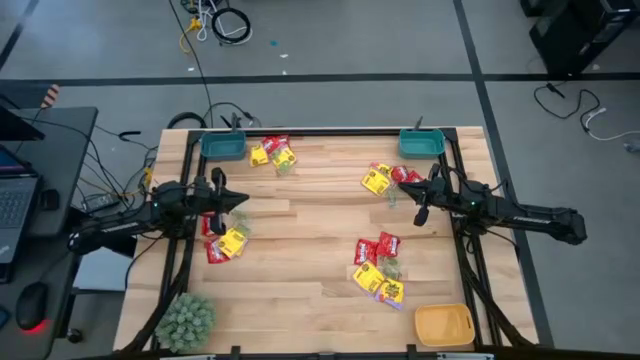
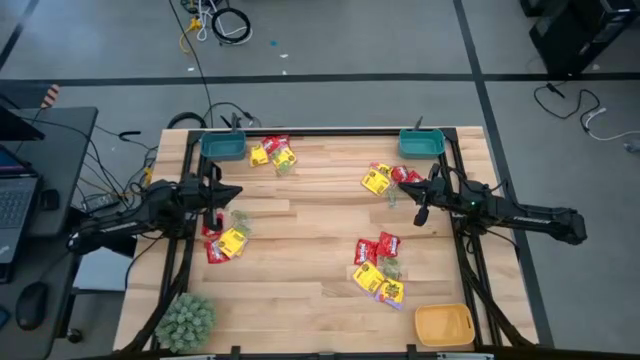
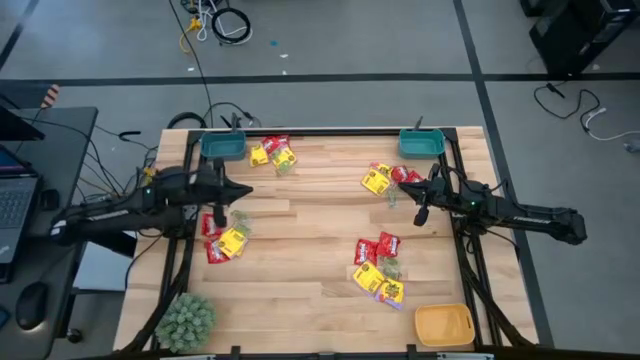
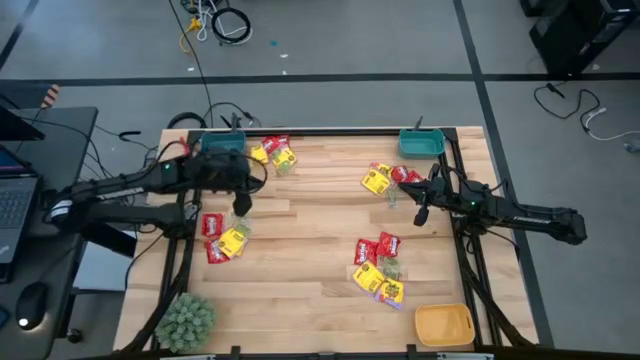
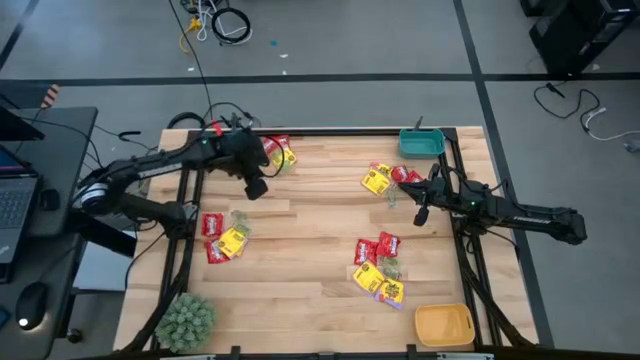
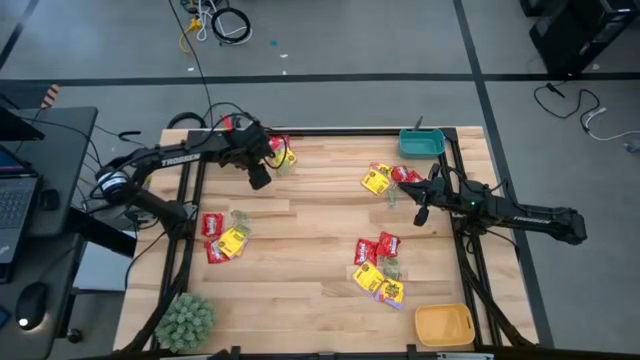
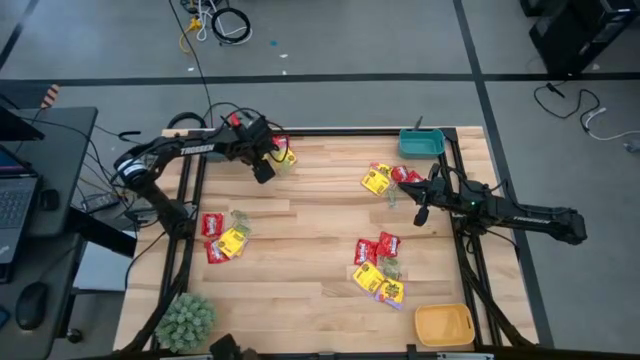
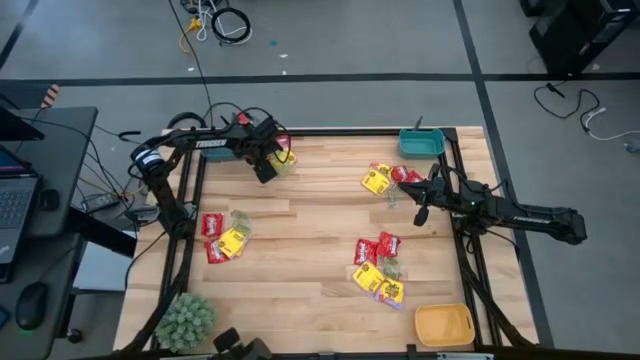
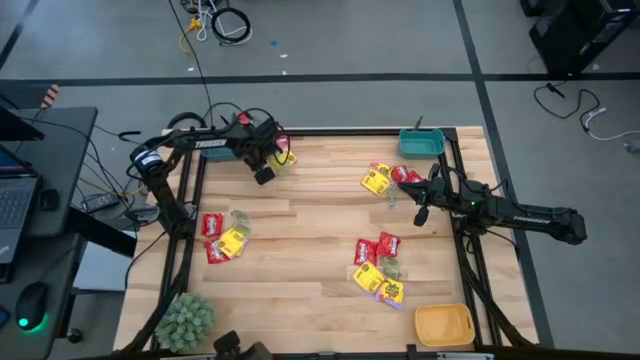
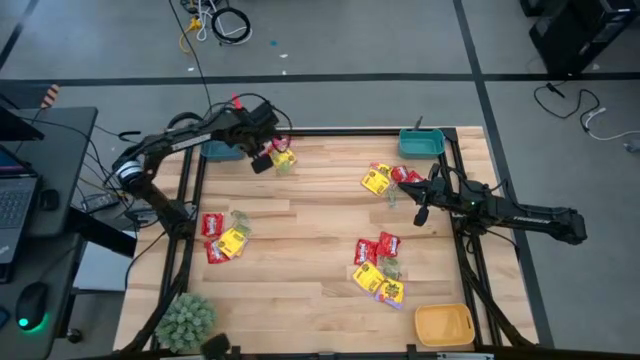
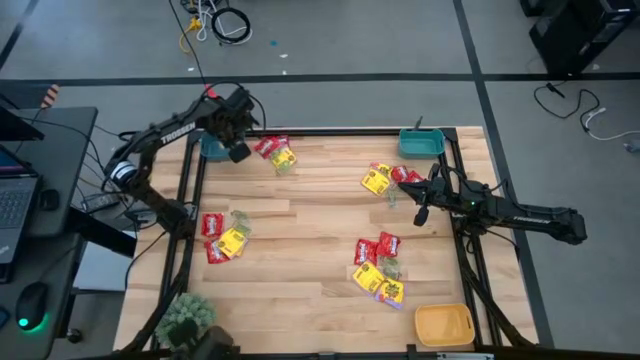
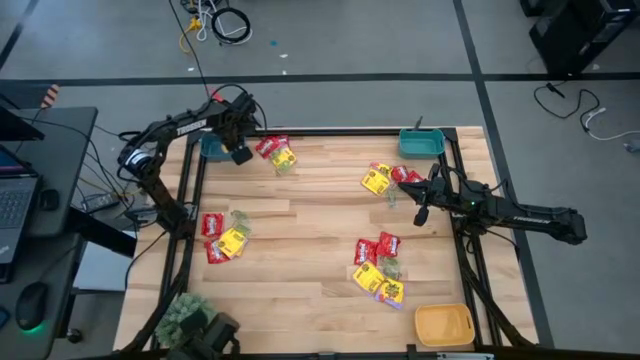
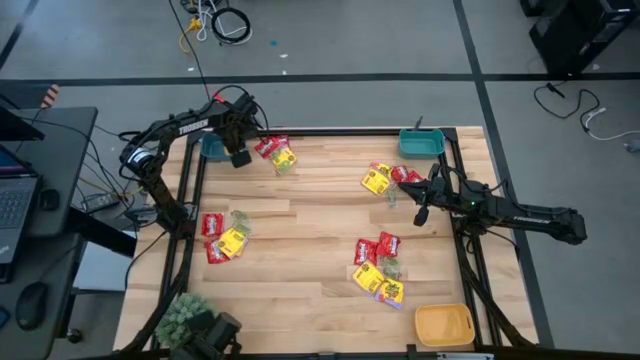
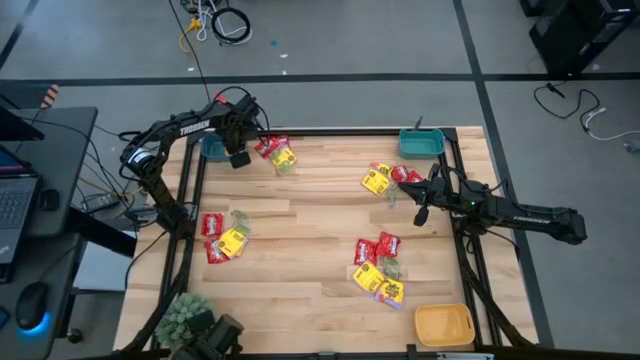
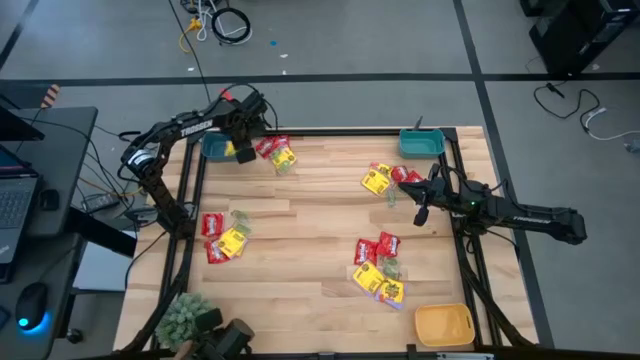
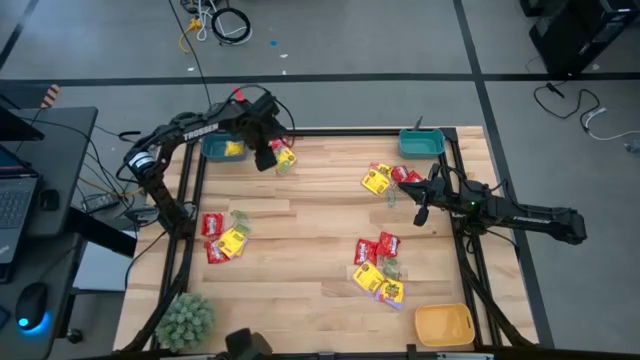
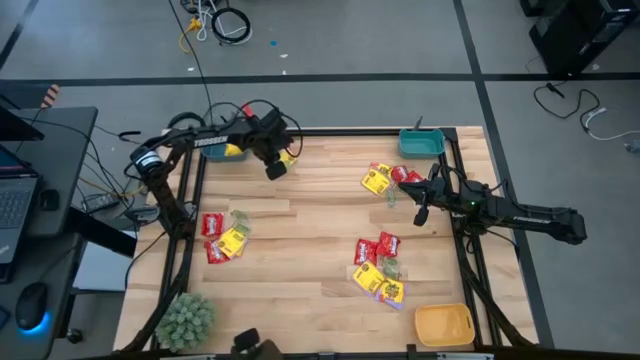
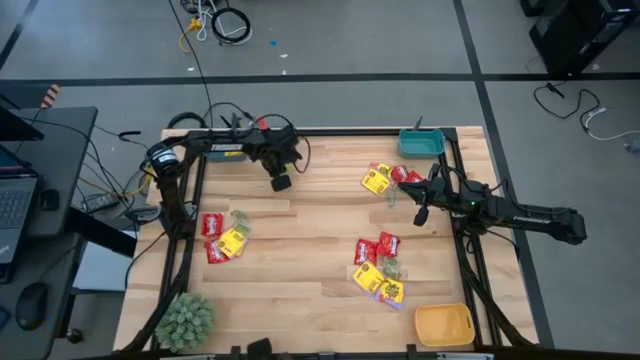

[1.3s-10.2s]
Task: Sort candy
Put the yellow candy into the dark blue bin

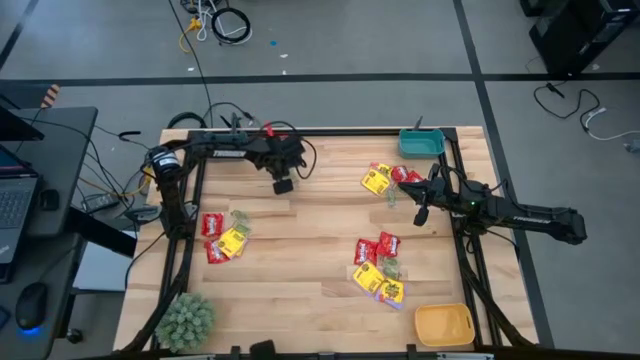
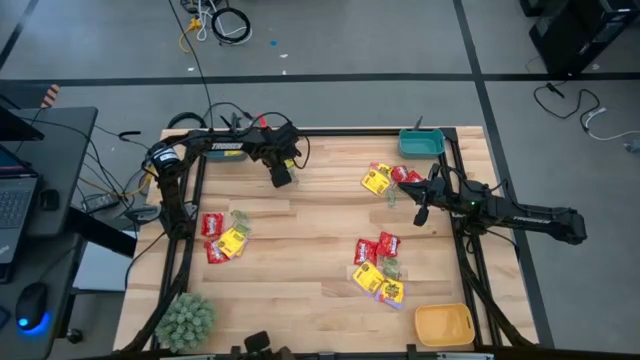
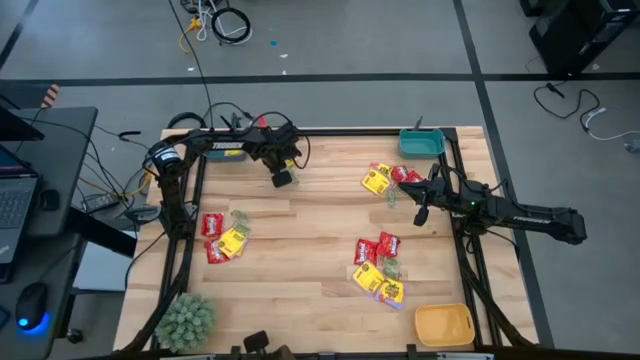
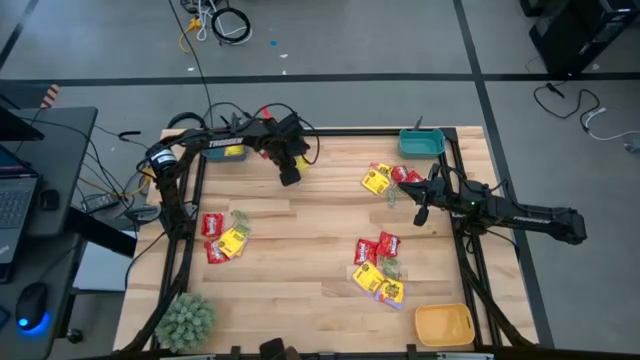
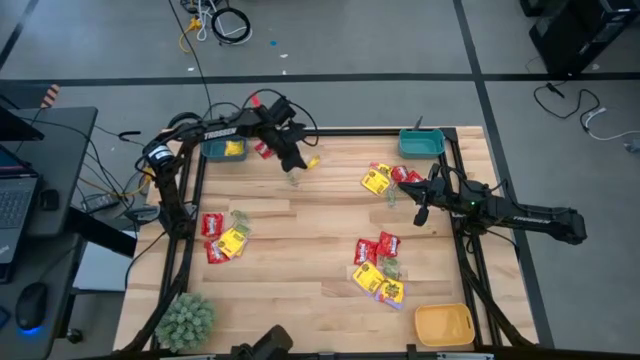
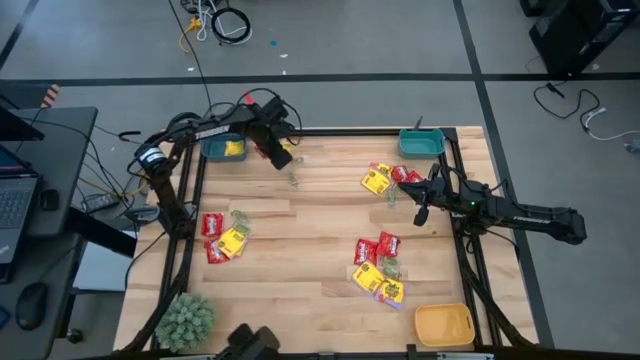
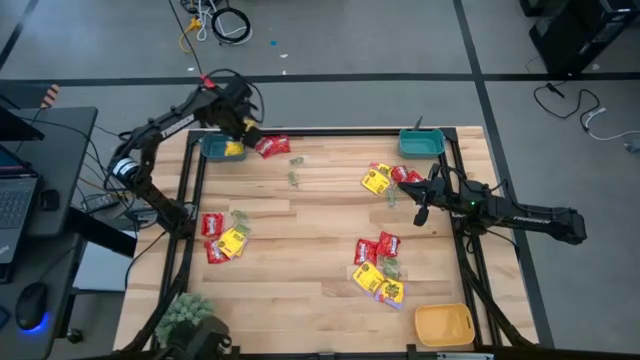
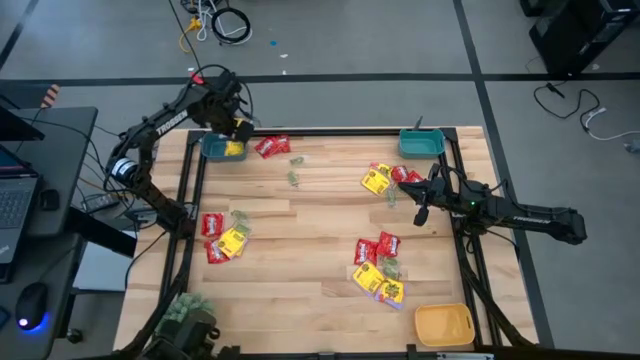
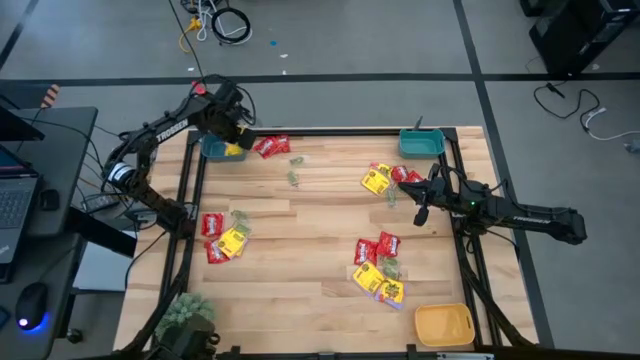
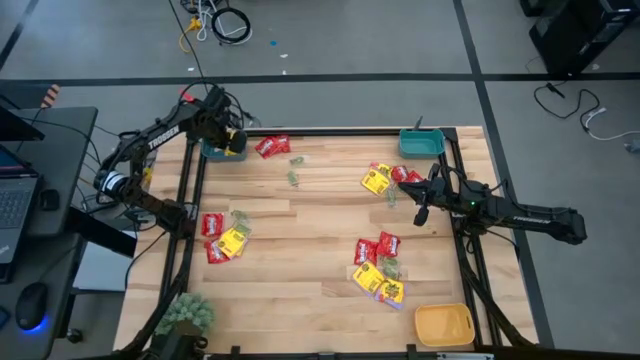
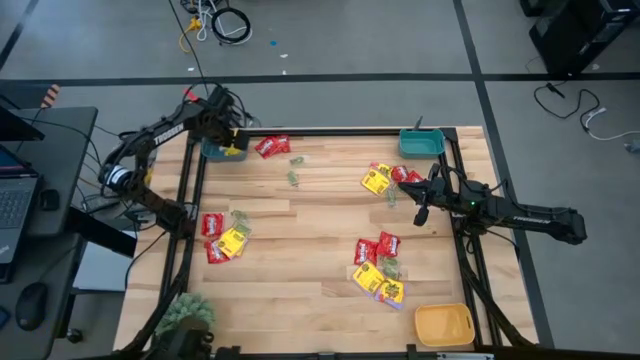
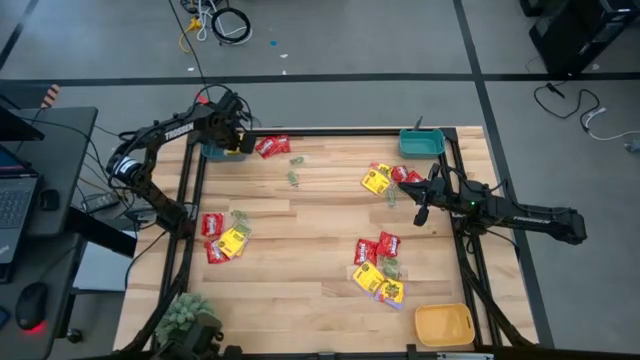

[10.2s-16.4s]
Put the yellow candy into the dark blue bin

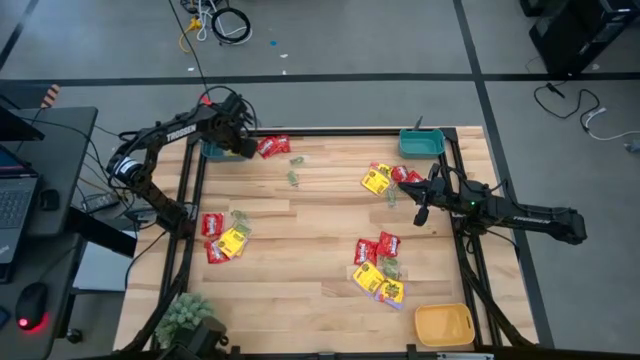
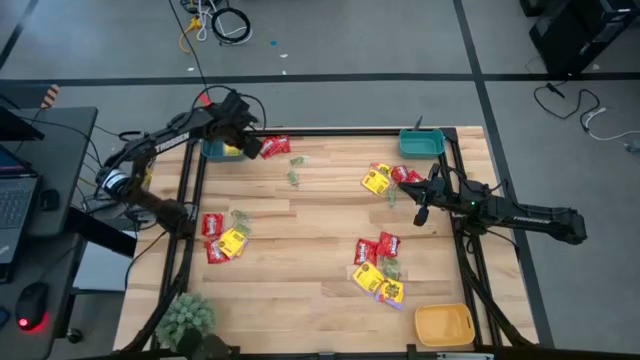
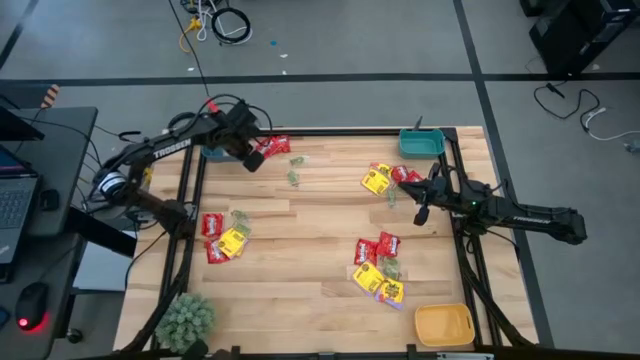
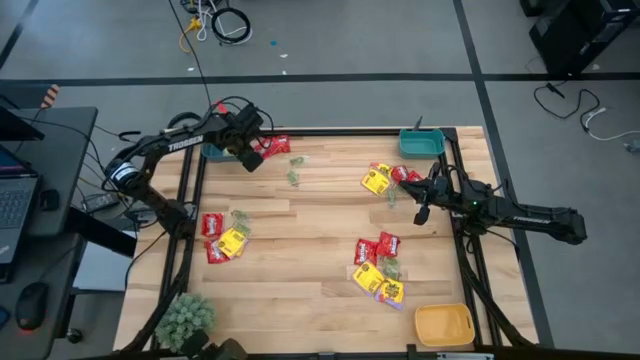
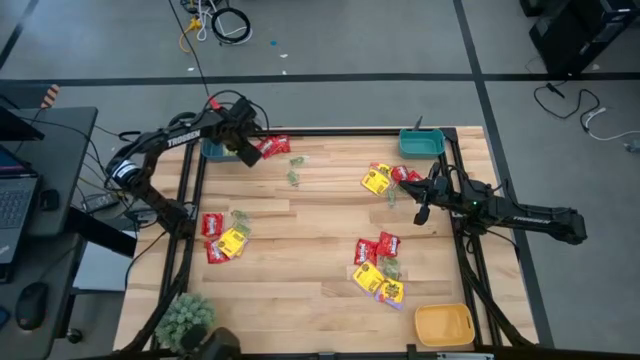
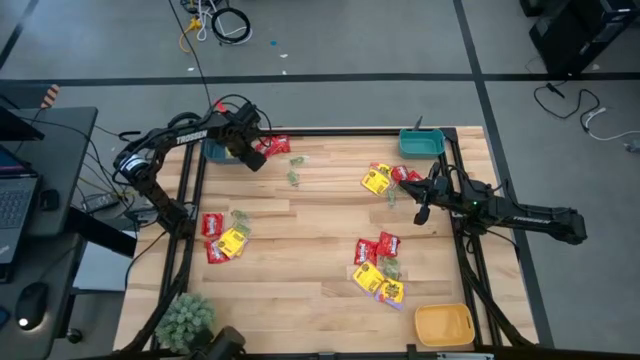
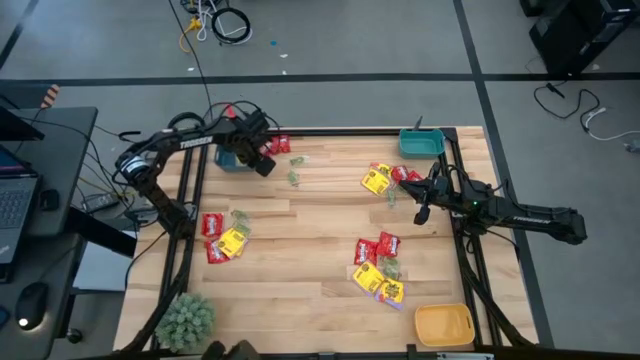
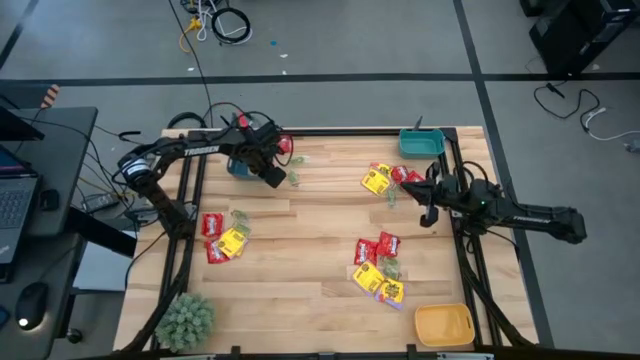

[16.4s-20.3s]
Adjust the dark blue bin

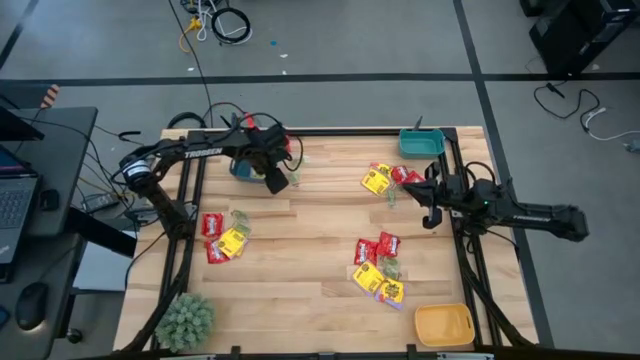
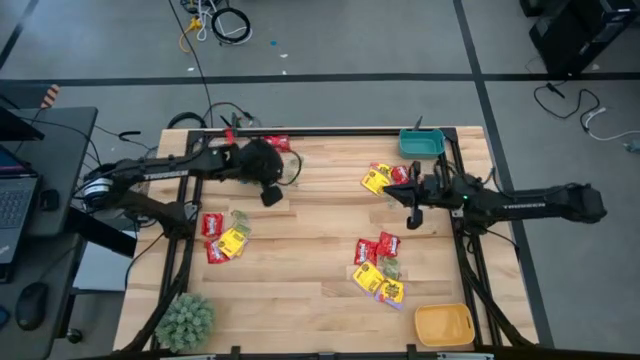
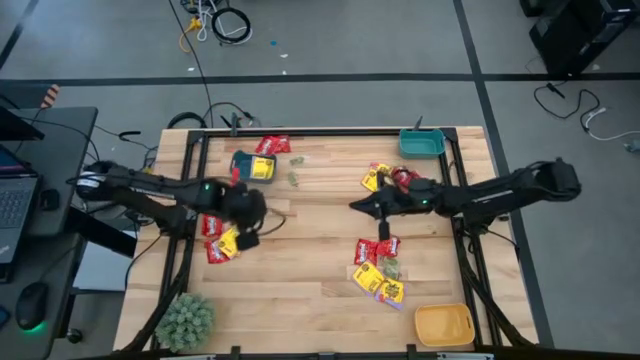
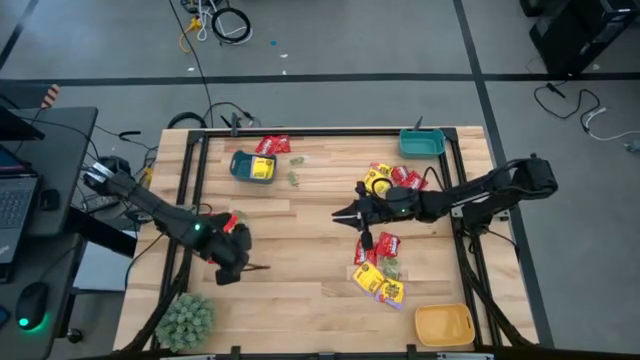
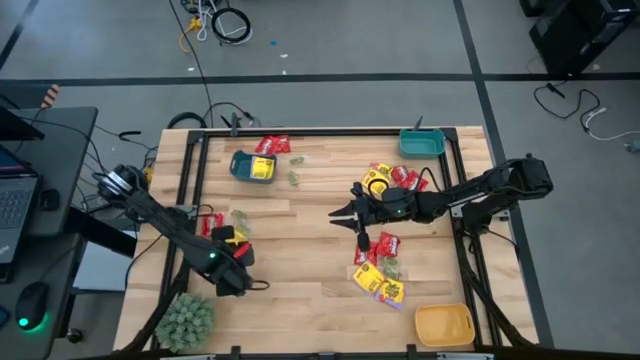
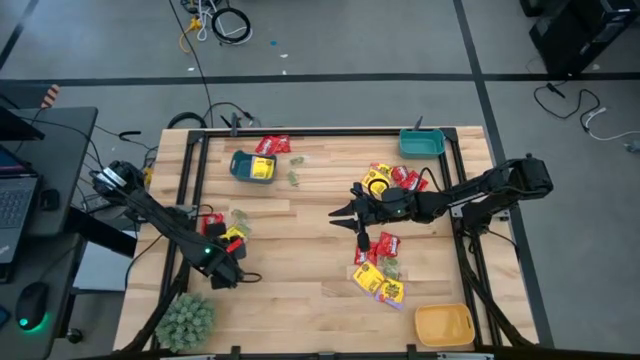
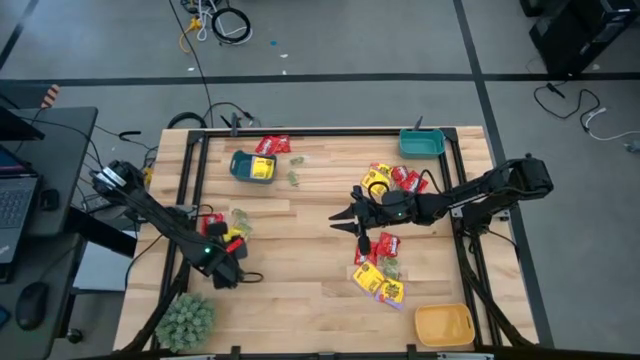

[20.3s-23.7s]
Put the yellow candy into the dark blue bin
